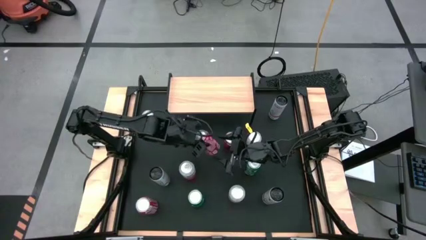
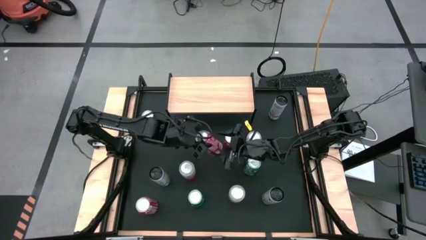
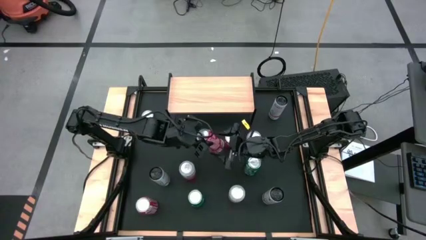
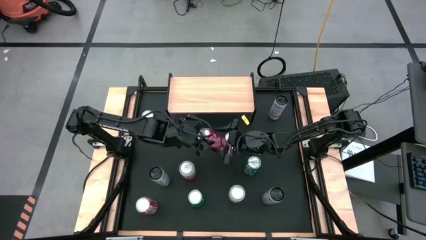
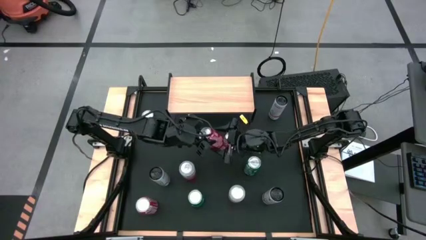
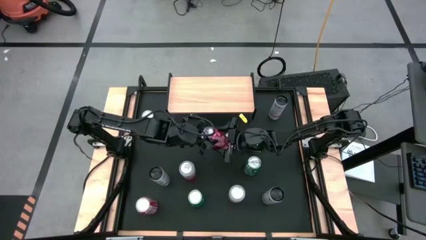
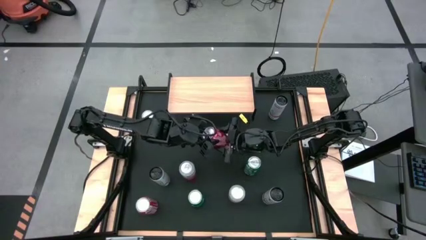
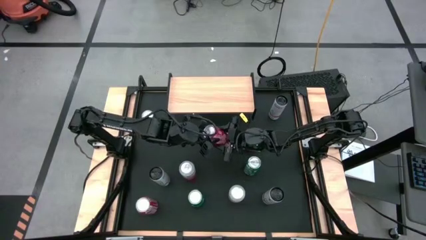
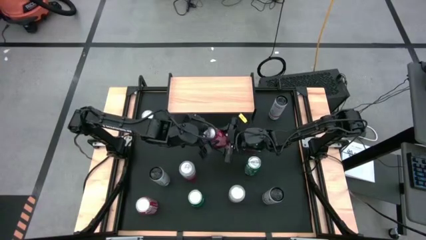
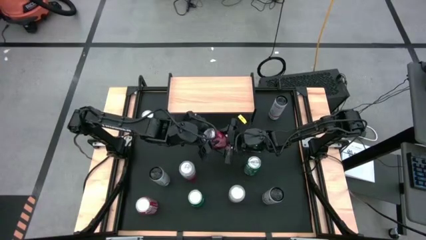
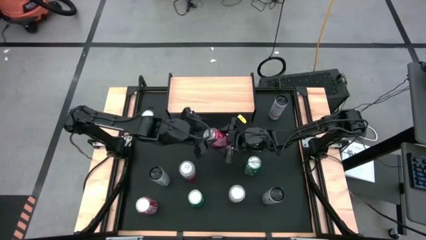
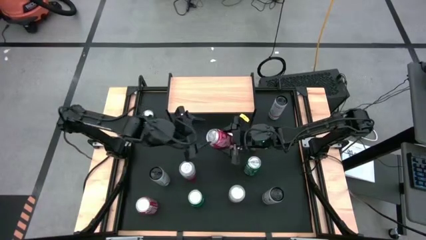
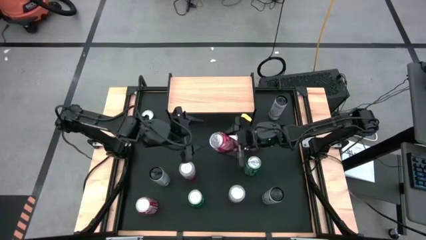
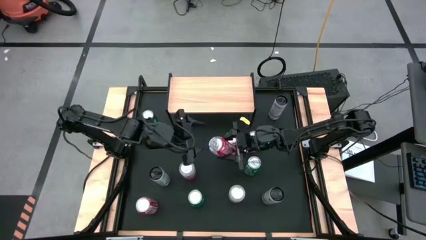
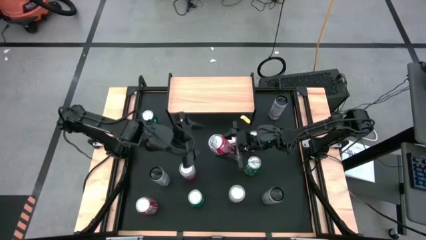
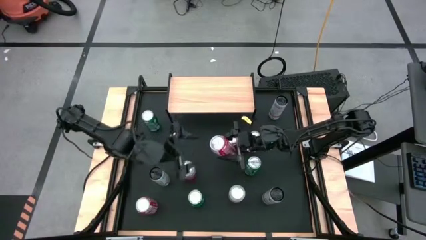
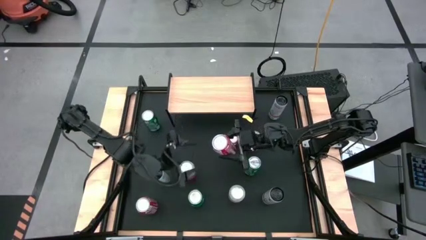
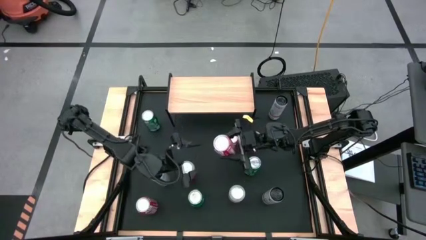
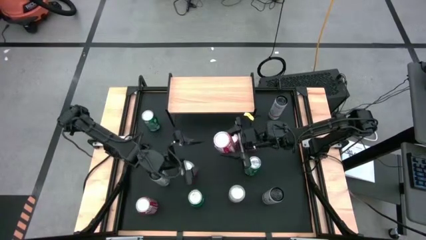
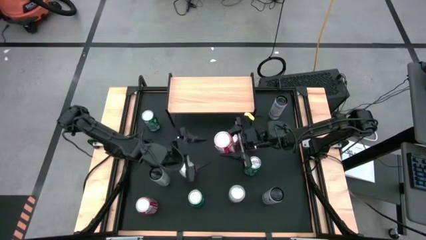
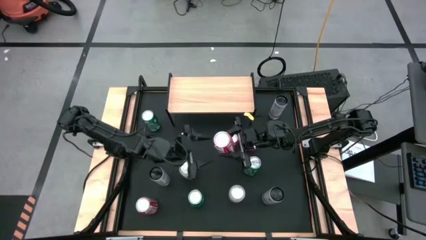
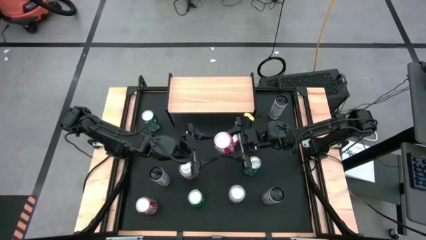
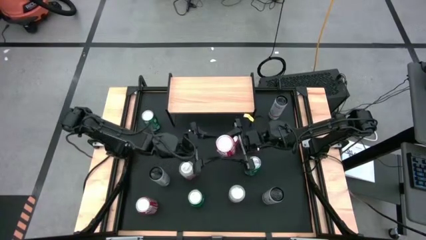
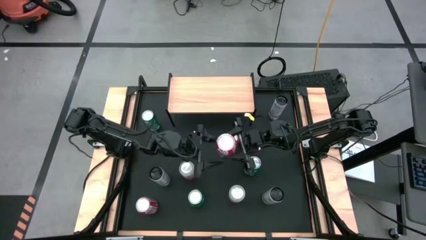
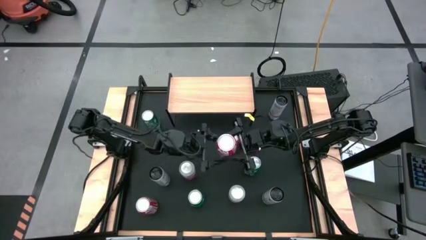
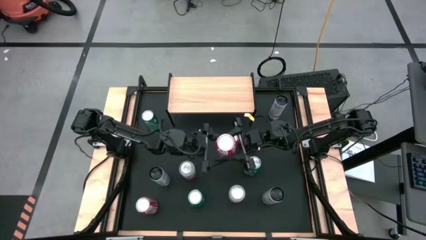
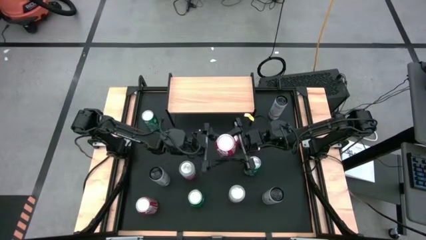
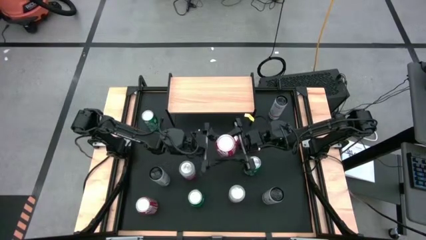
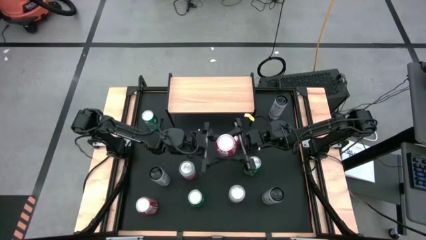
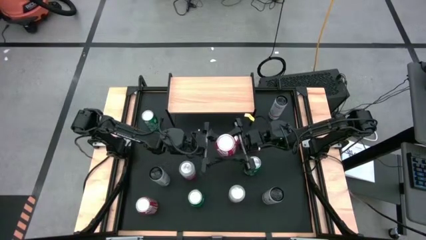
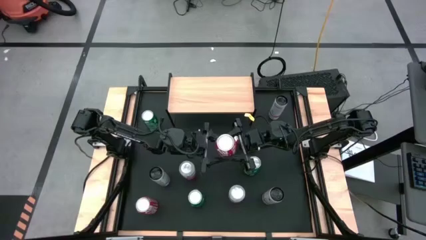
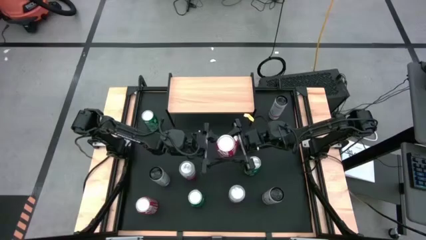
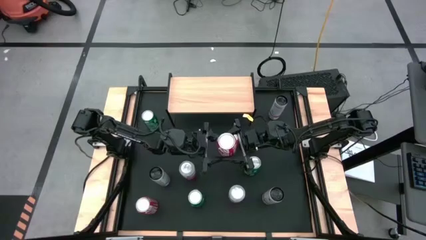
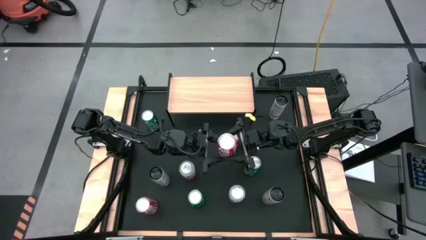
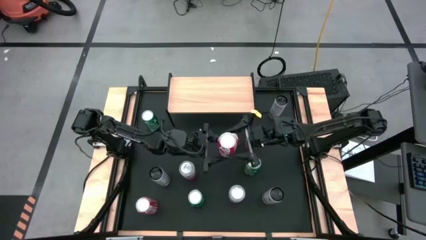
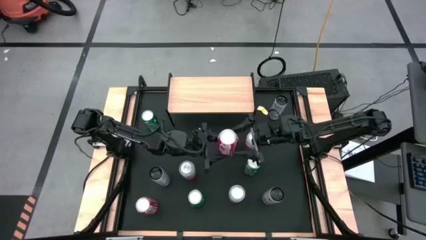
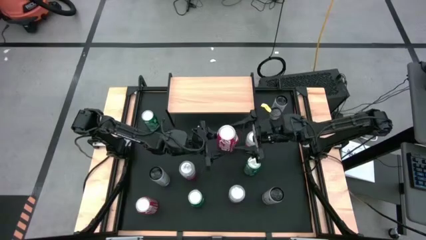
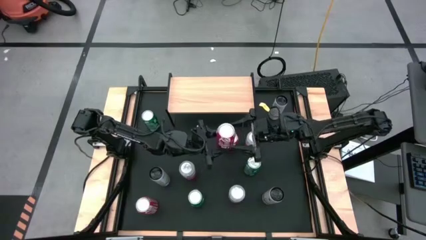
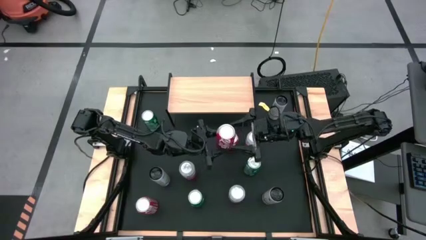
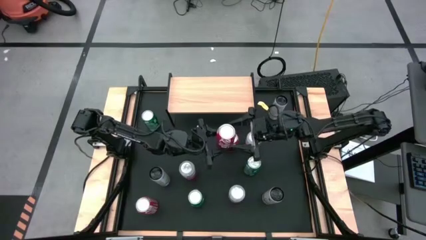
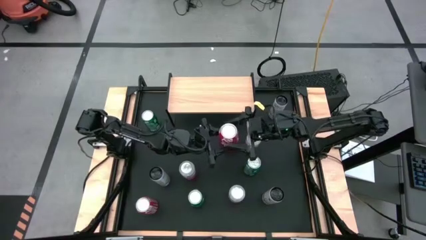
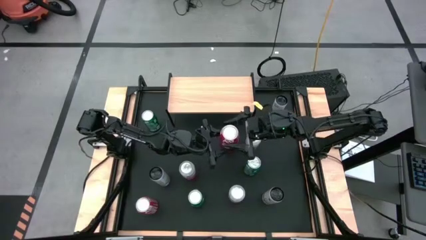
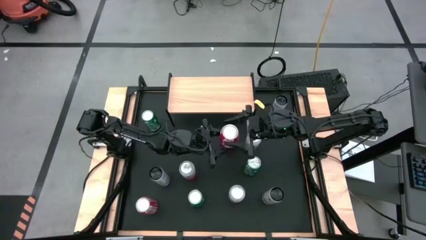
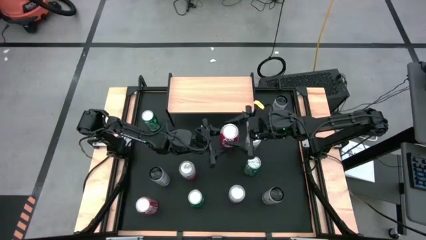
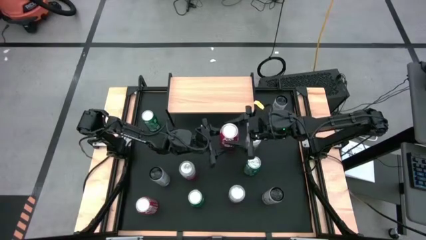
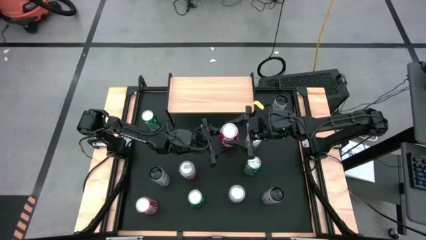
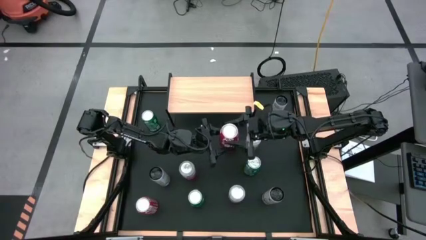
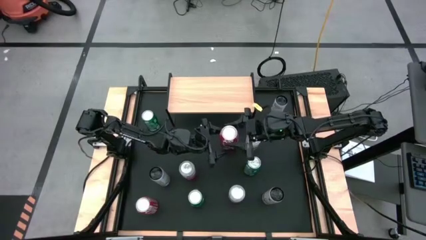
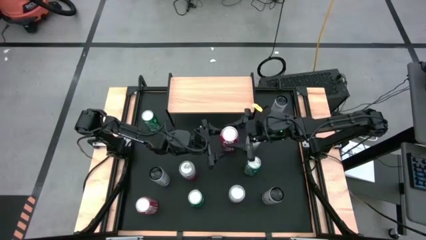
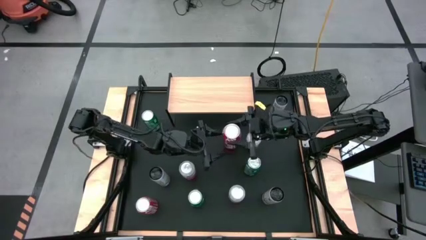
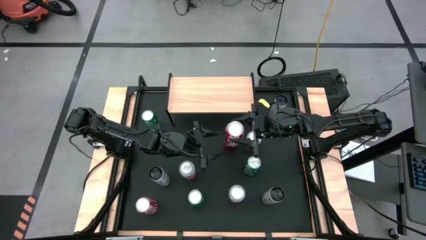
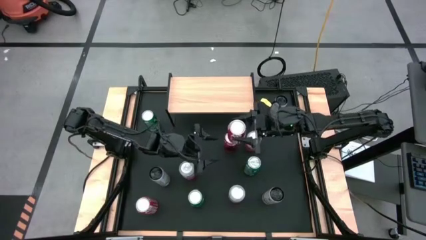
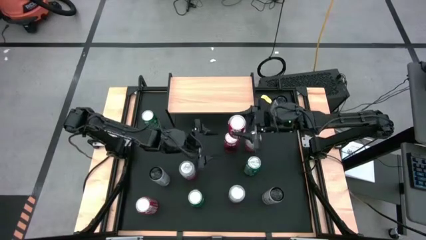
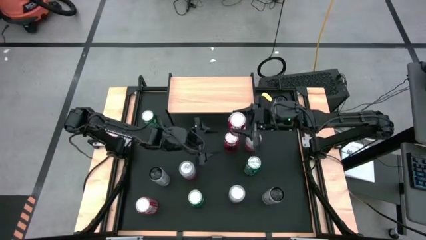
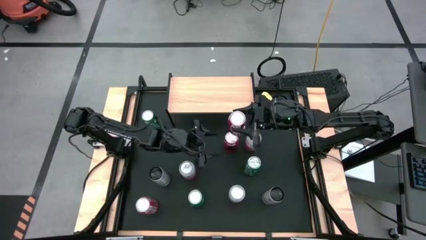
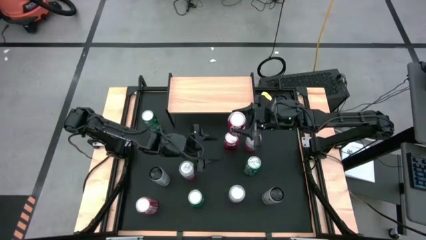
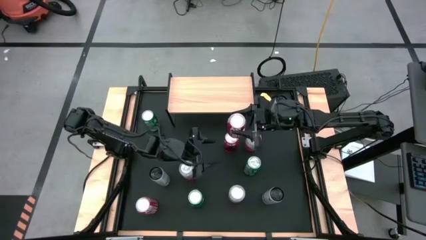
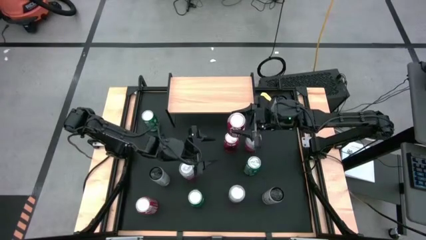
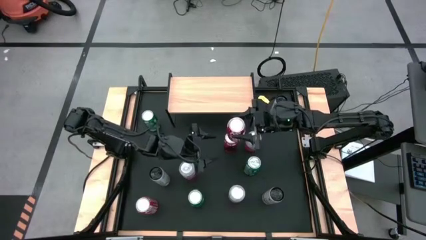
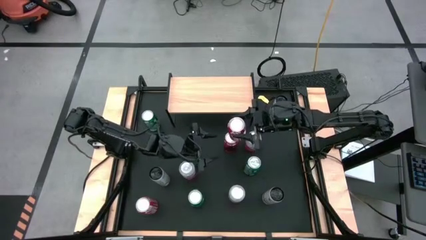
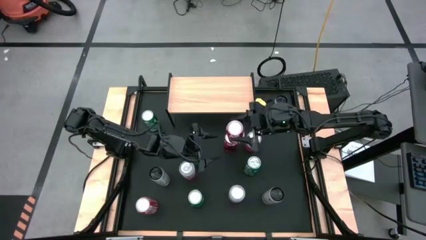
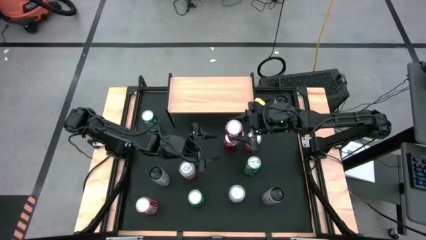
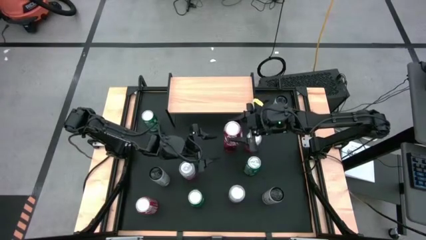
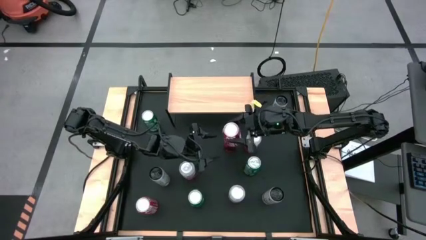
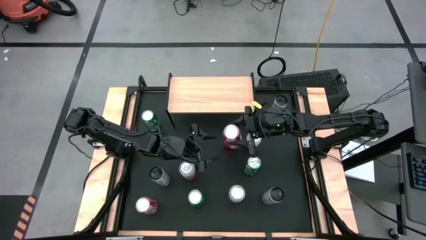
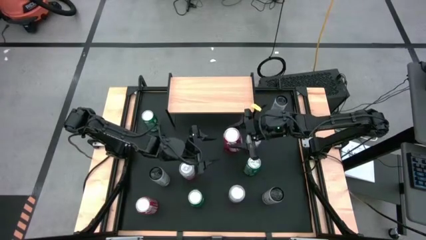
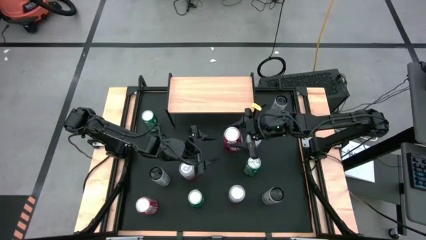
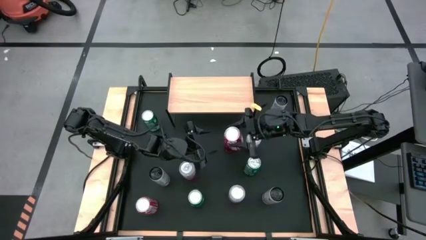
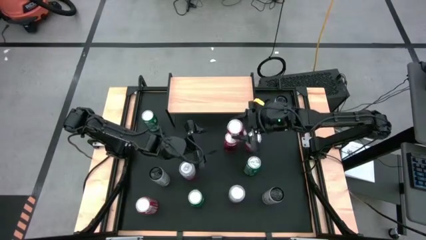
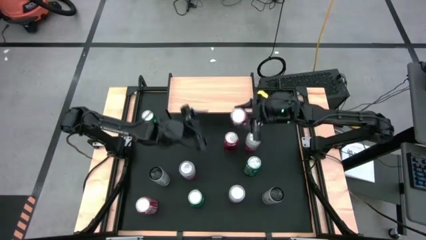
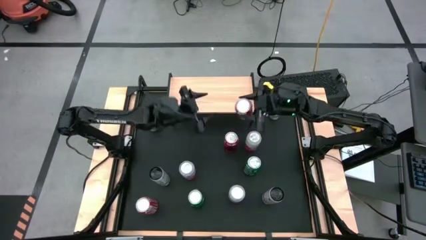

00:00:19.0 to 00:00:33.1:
Task: Place canned beverage on shelf
Put the top left red soda on the shelf
